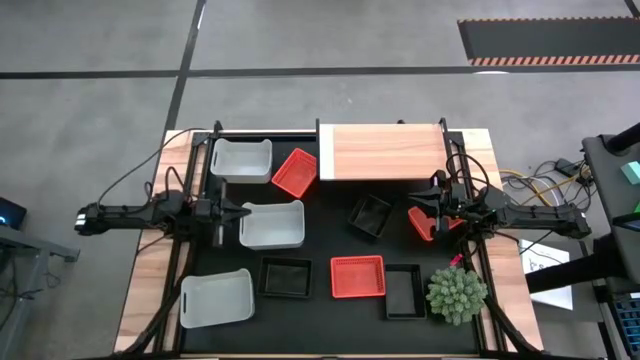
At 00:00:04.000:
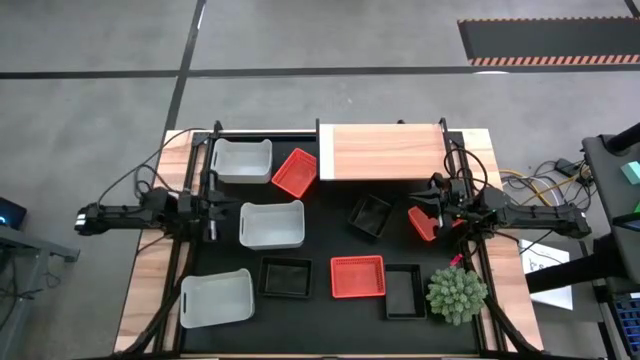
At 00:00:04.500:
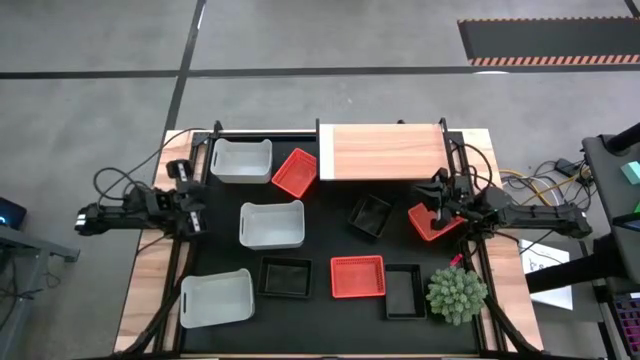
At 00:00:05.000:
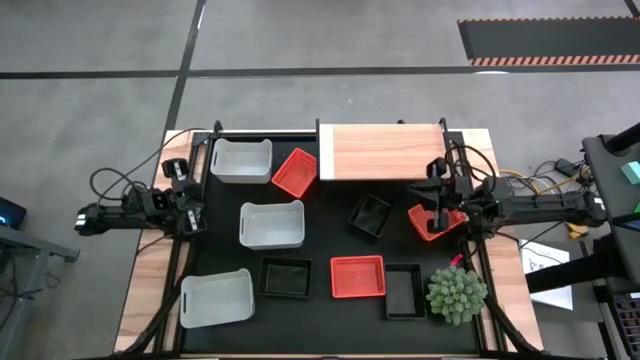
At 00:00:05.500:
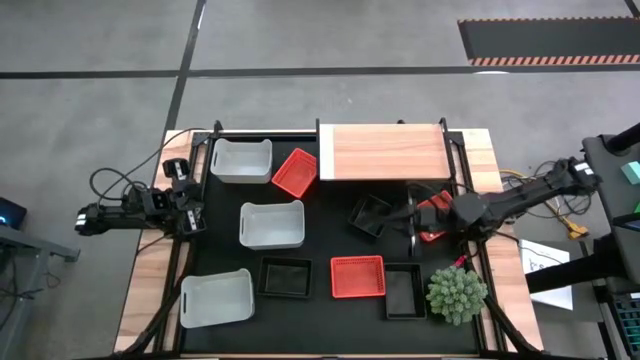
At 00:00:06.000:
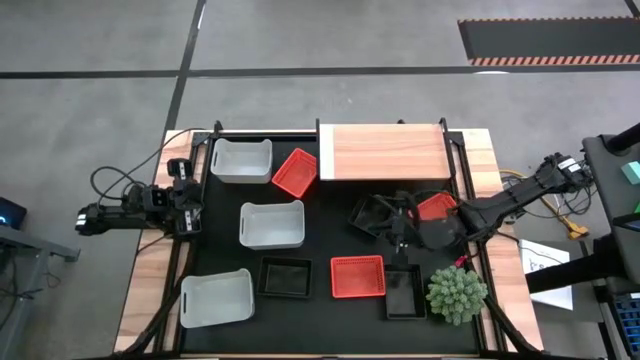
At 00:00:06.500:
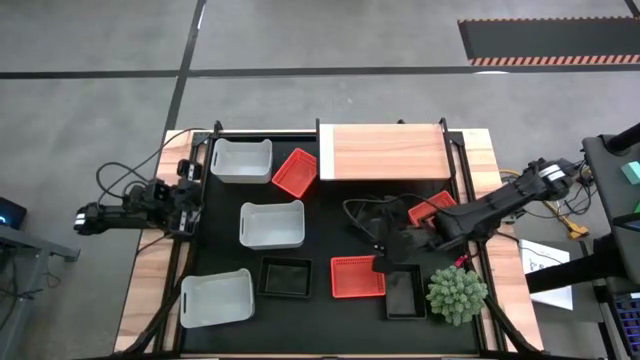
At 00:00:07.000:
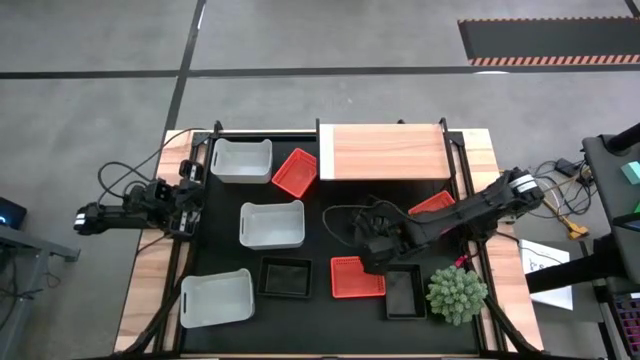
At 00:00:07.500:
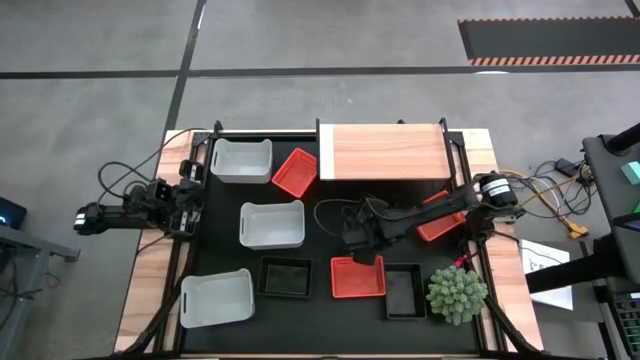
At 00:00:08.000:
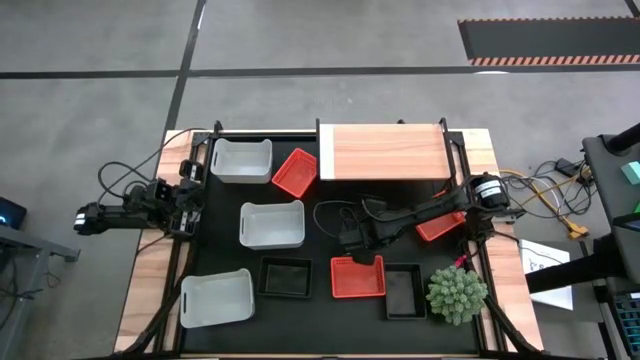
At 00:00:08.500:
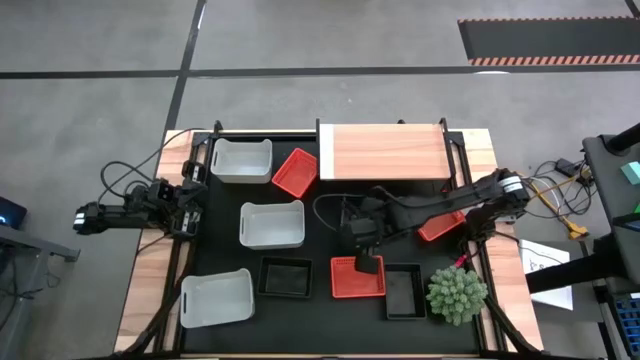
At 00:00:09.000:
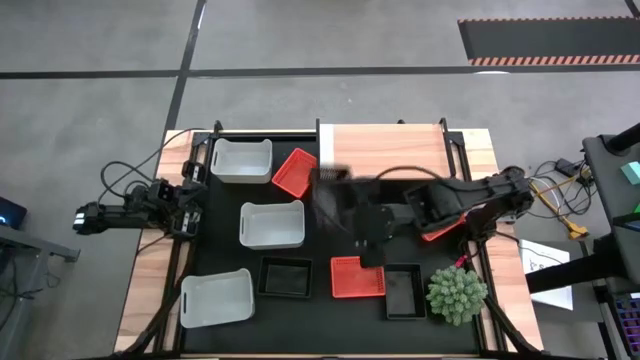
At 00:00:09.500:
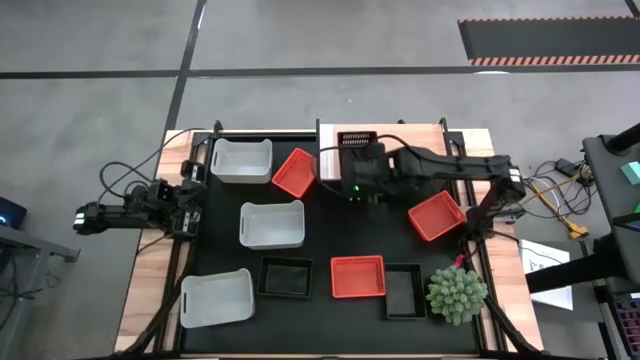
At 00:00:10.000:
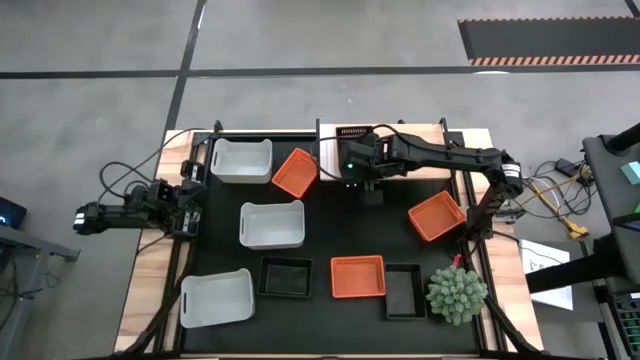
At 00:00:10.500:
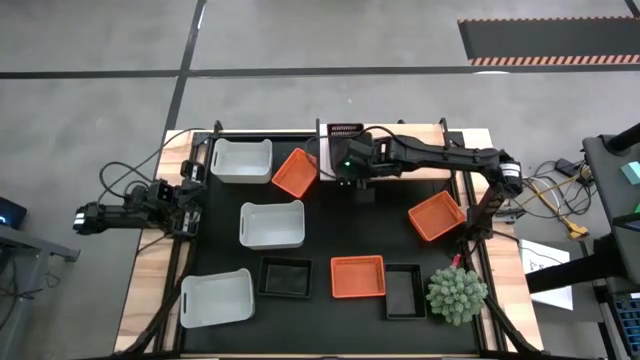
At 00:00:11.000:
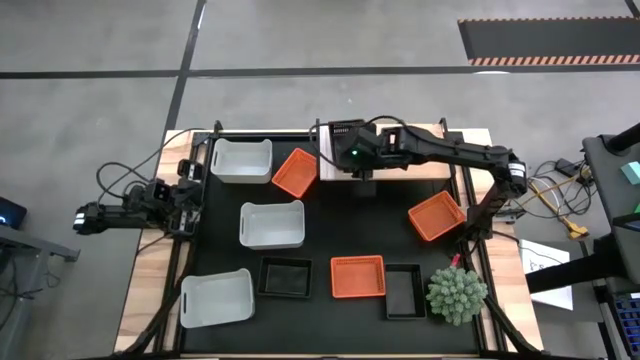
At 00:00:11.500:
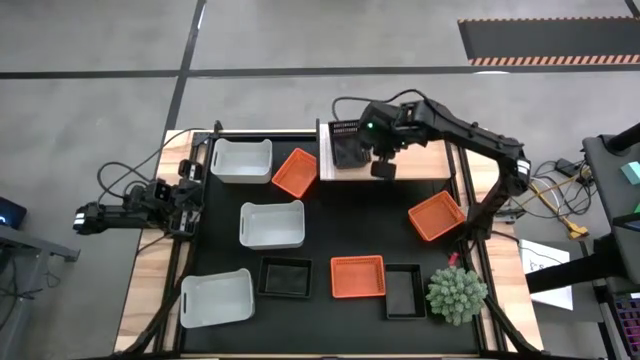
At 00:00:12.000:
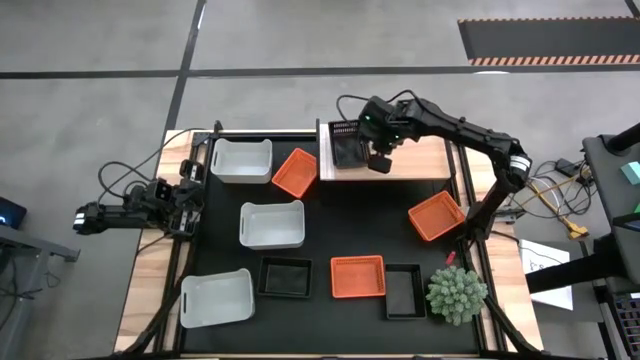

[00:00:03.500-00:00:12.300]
Put the top black basket on the shelf

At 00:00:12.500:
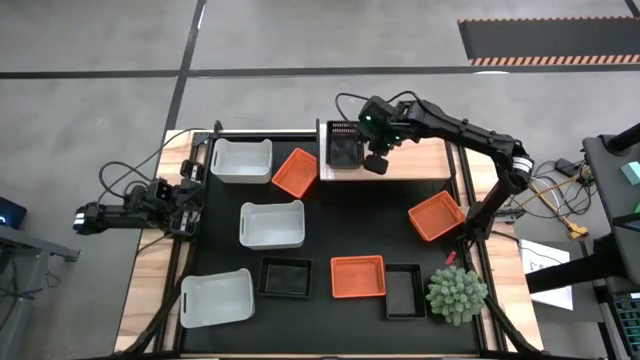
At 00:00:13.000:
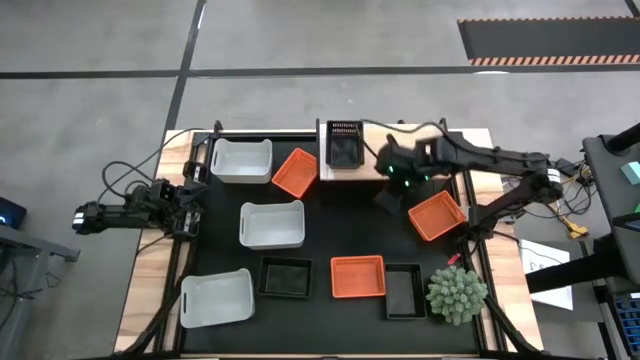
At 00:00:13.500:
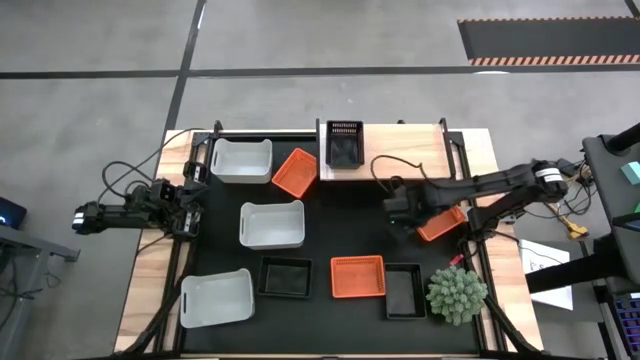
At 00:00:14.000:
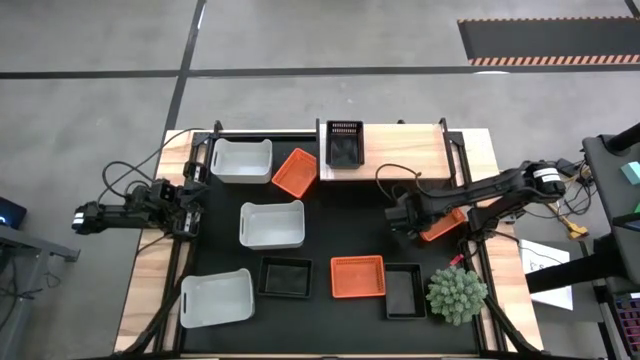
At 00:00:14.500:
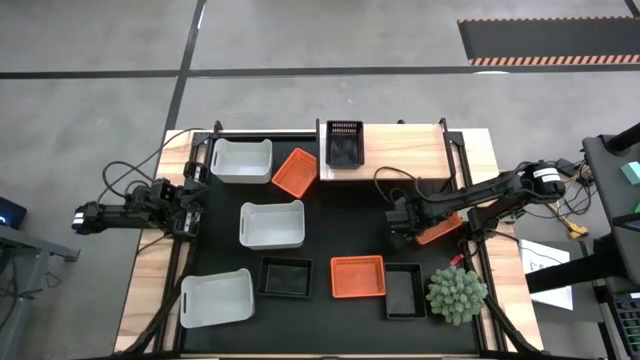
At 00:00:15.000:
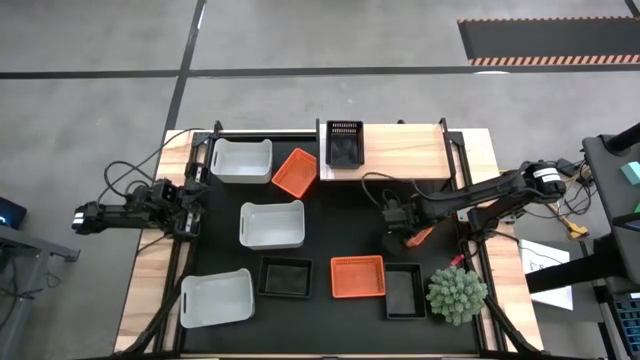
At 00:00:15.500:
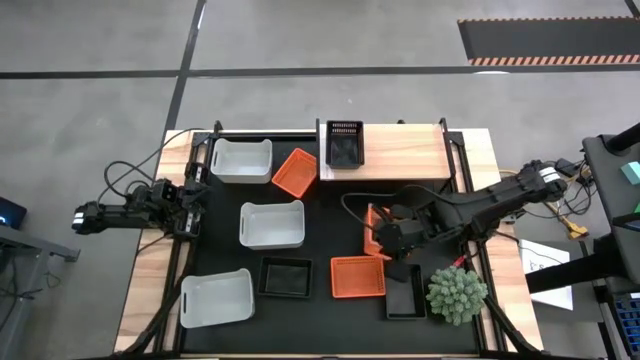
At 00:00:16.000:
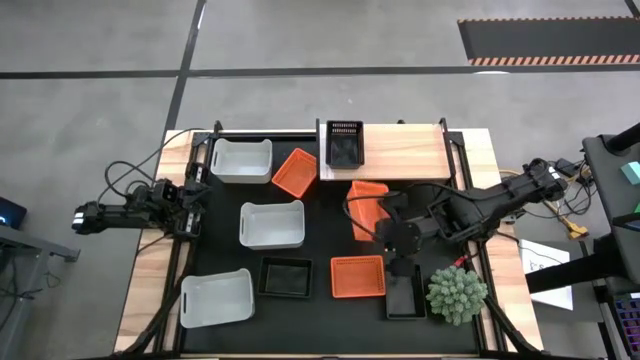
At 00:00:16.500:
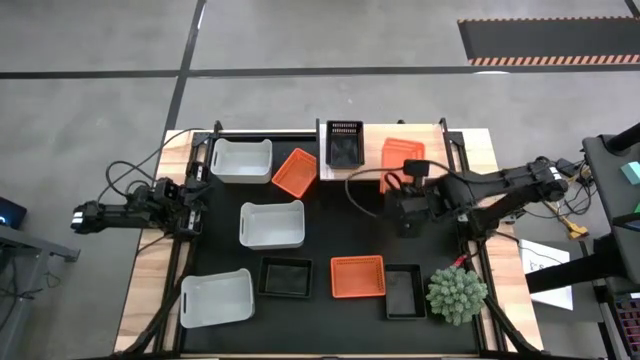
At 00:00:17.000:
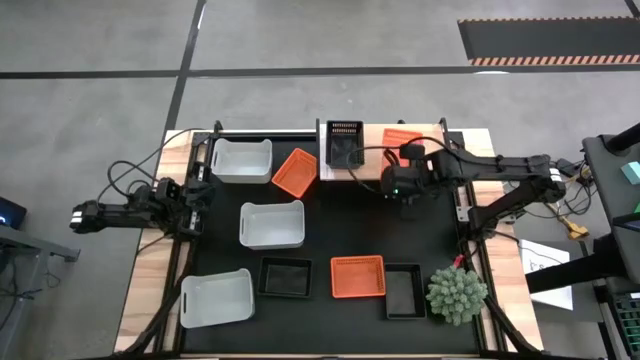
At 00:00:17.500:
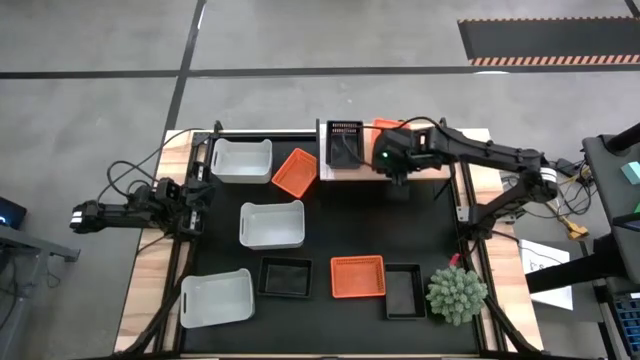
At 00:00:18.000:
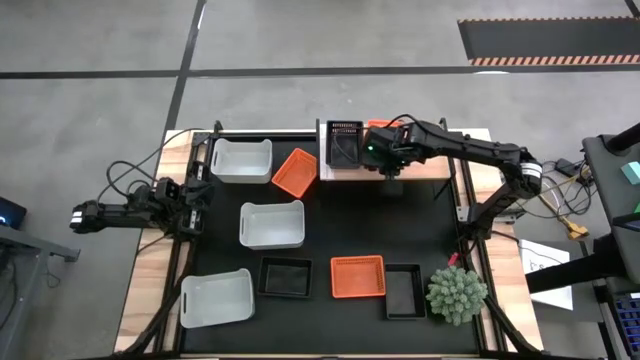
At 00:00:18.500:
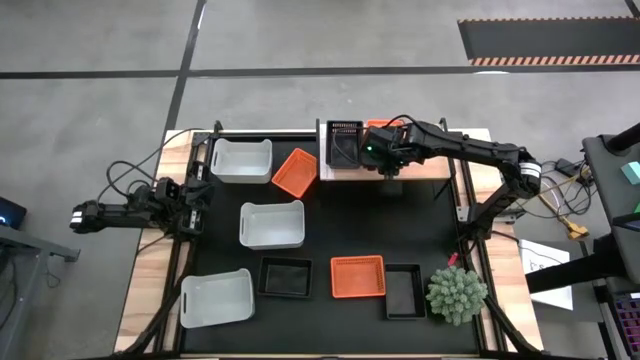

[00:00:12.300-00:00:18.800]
Put the right orange basket on the shelf

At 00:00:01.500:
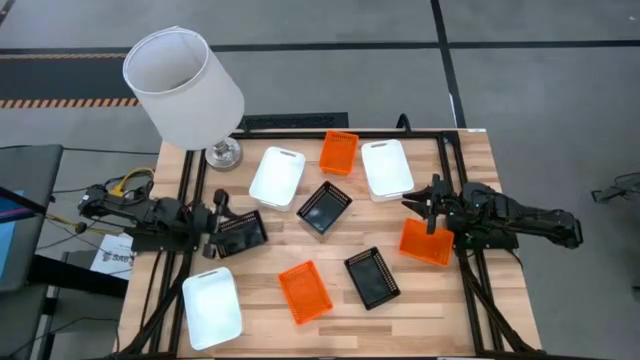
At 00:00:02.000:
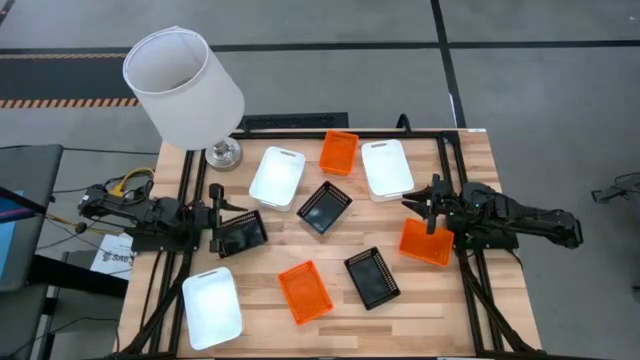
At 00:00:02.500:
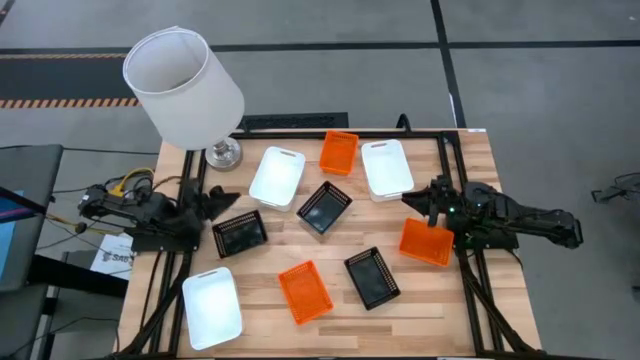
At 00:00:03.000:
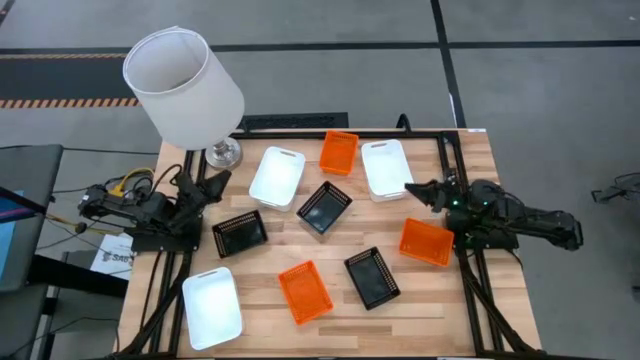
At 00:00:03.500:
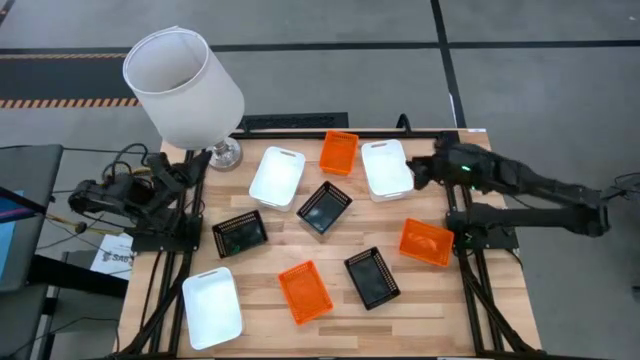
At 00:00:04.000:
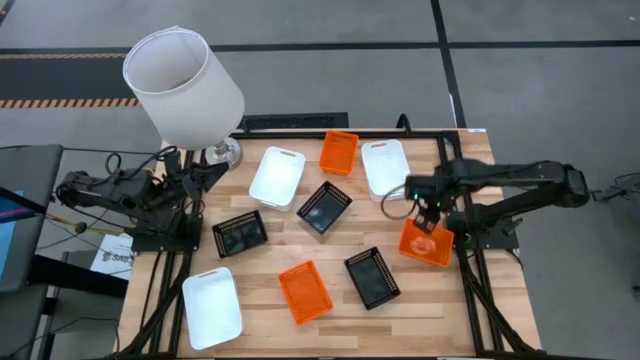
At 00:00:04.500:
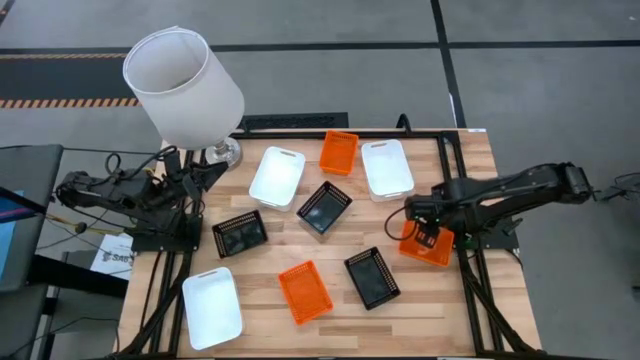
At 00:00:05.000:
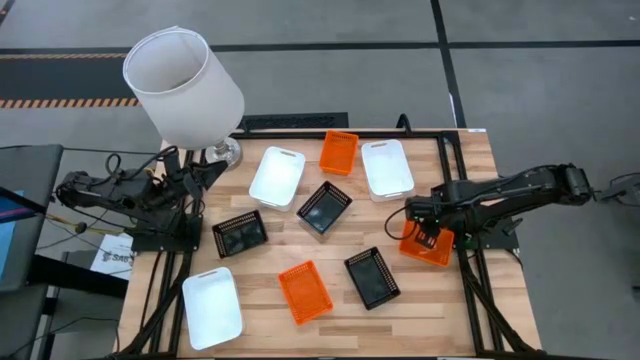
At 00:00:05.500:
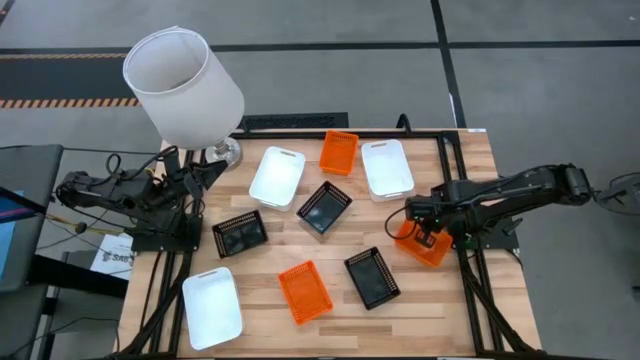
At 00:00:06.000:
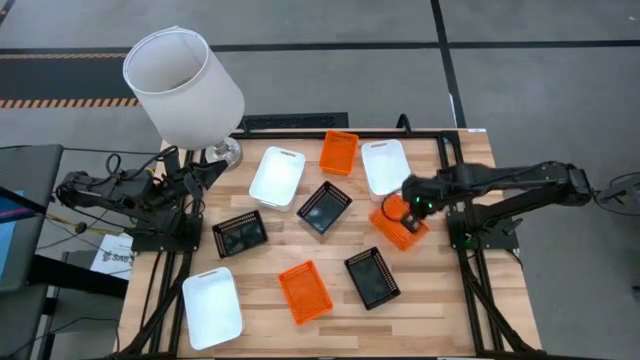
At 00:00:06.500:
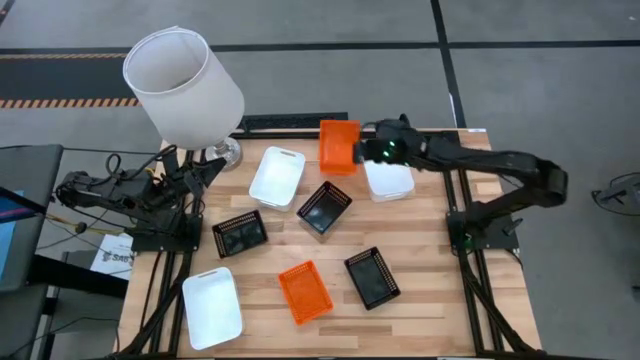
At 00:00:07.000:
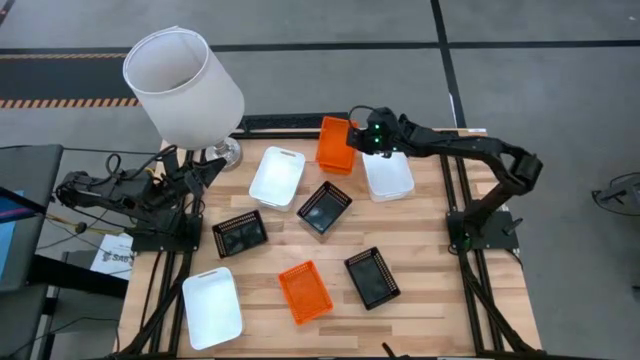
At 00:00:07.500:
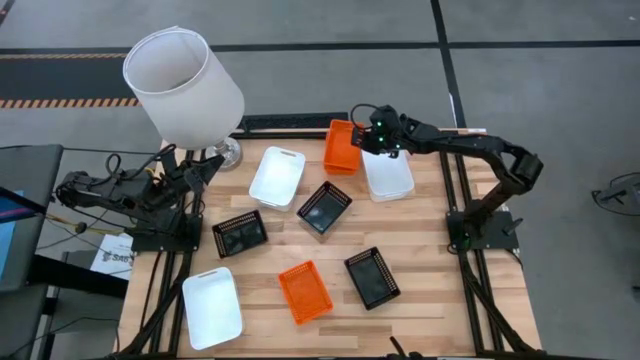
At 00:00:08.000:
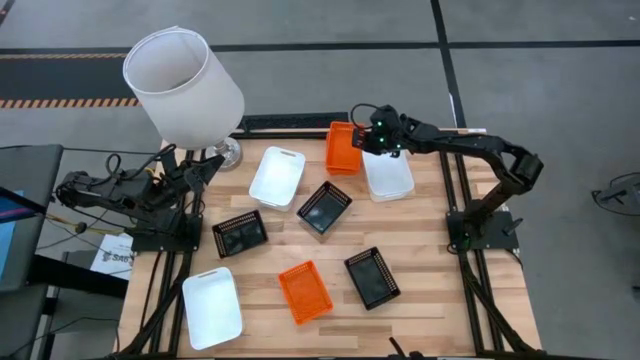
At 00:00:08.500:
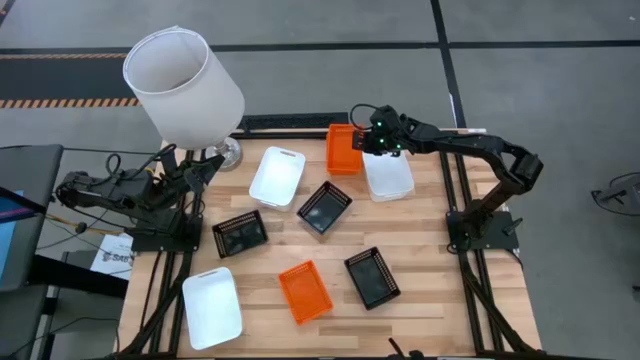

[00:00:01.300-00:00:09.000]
Stack the middle orange bin on the top orange bin
